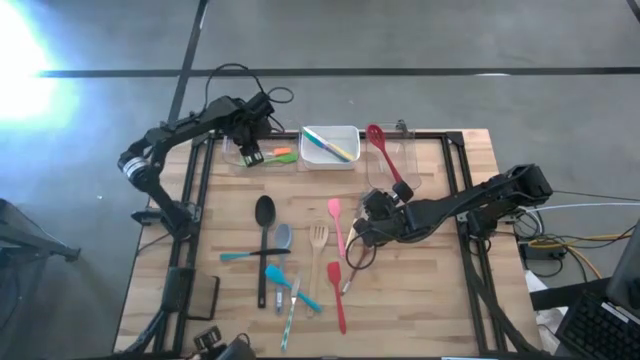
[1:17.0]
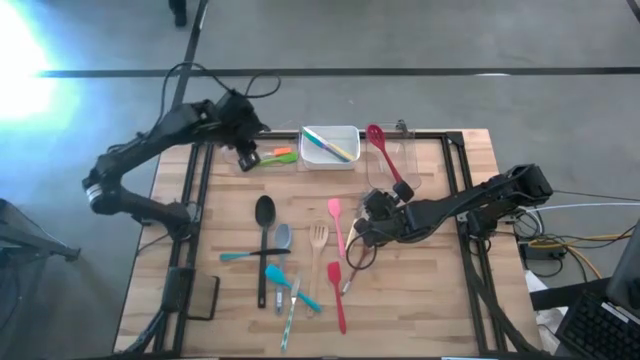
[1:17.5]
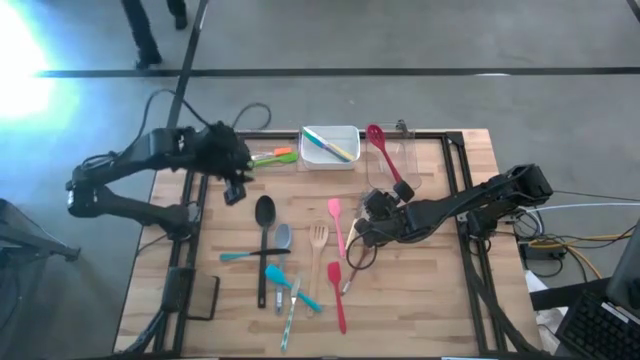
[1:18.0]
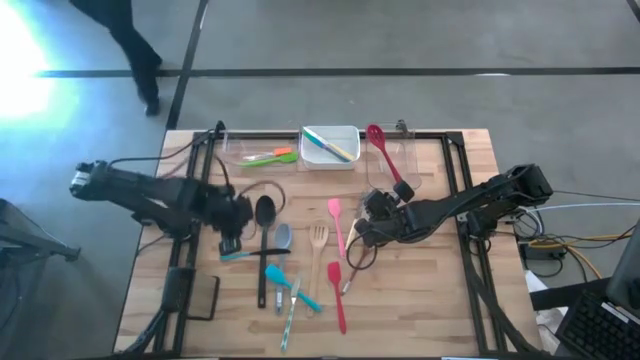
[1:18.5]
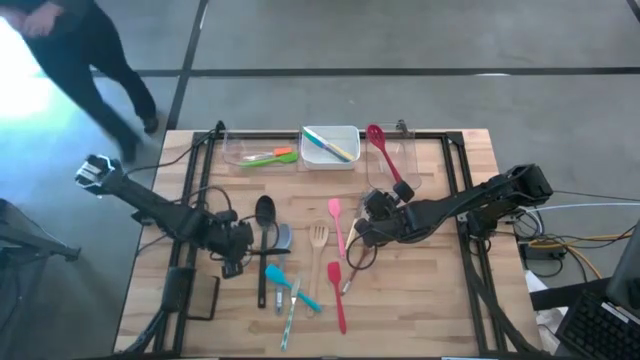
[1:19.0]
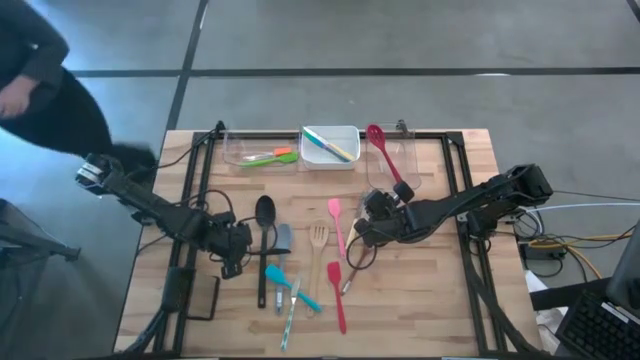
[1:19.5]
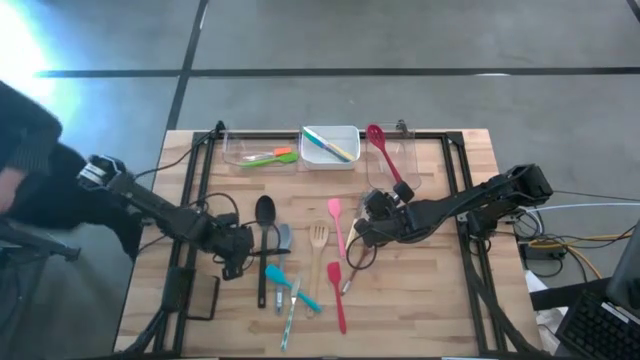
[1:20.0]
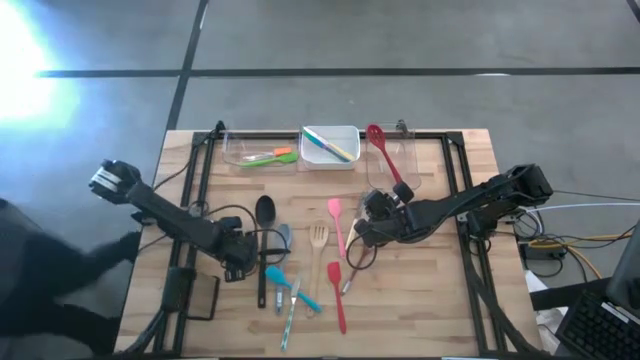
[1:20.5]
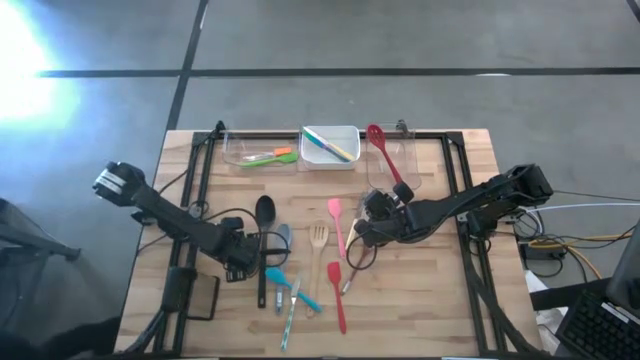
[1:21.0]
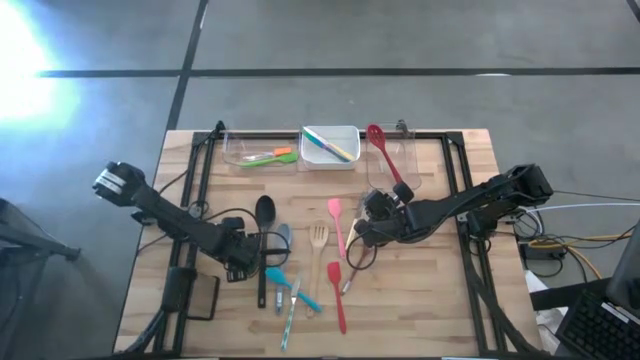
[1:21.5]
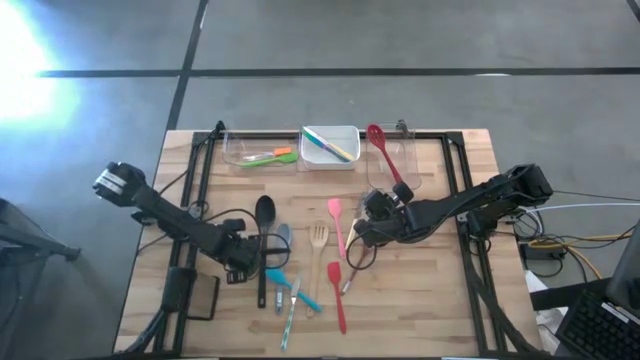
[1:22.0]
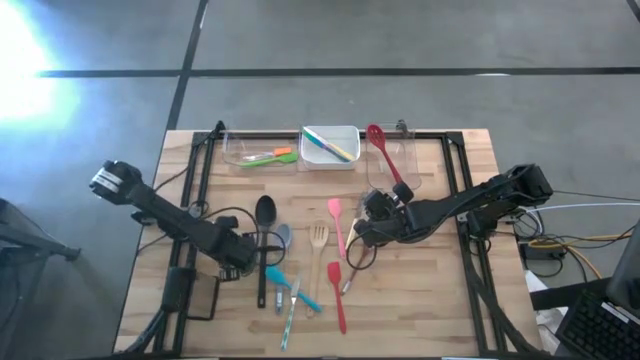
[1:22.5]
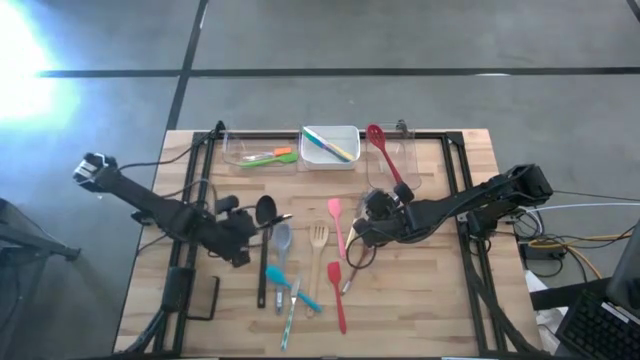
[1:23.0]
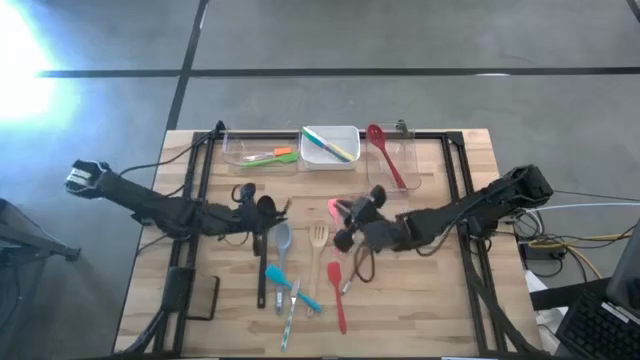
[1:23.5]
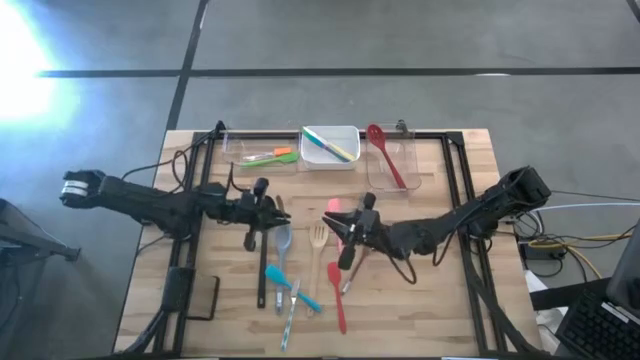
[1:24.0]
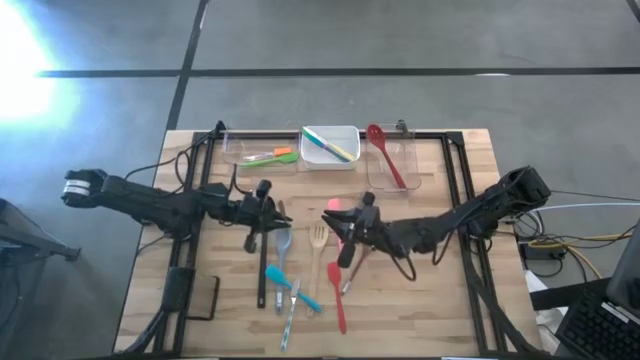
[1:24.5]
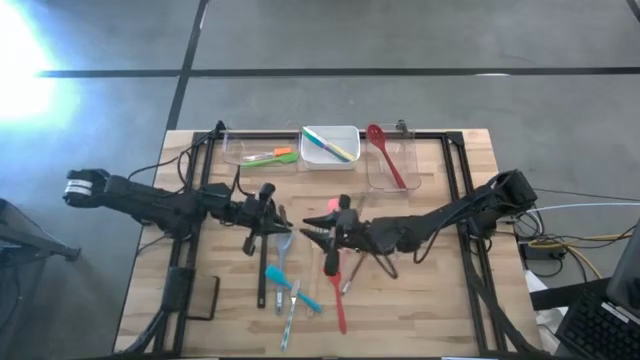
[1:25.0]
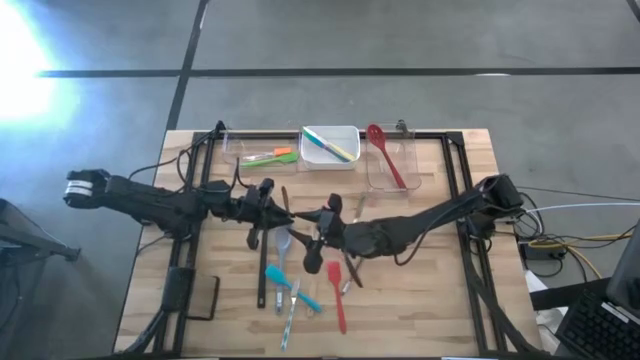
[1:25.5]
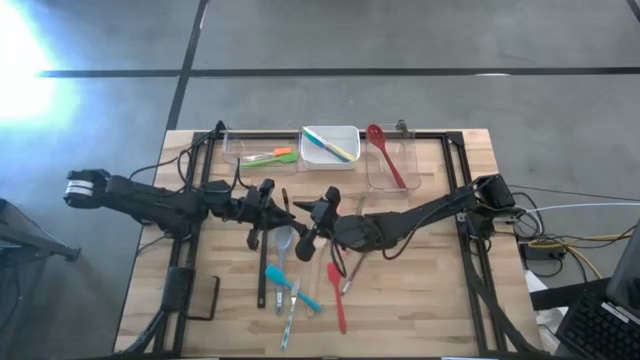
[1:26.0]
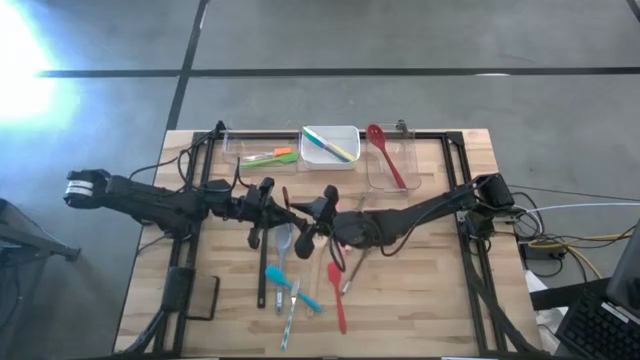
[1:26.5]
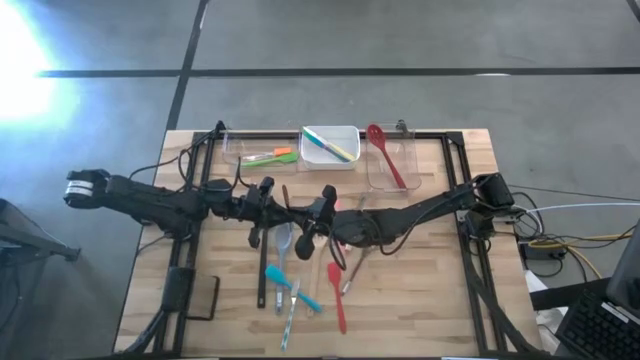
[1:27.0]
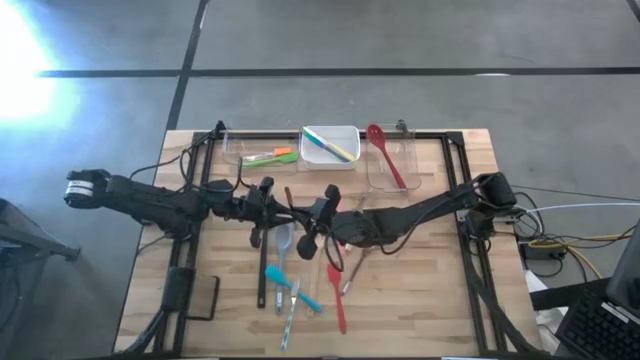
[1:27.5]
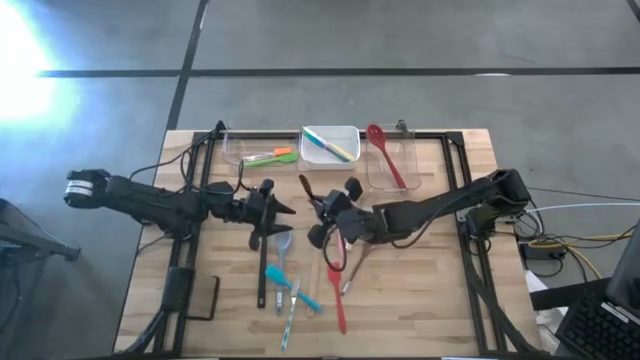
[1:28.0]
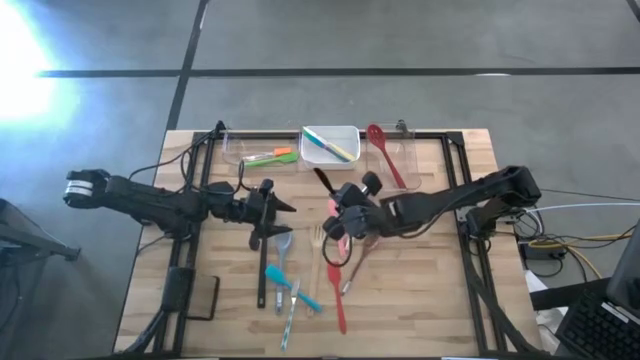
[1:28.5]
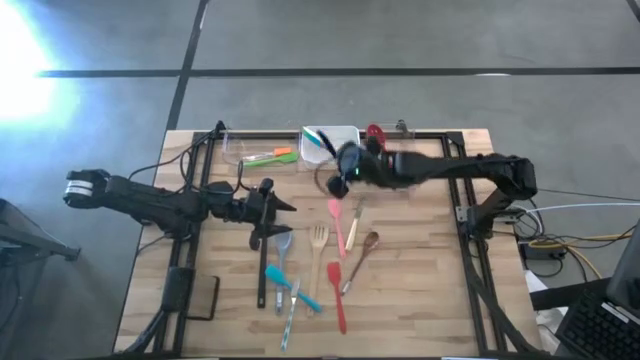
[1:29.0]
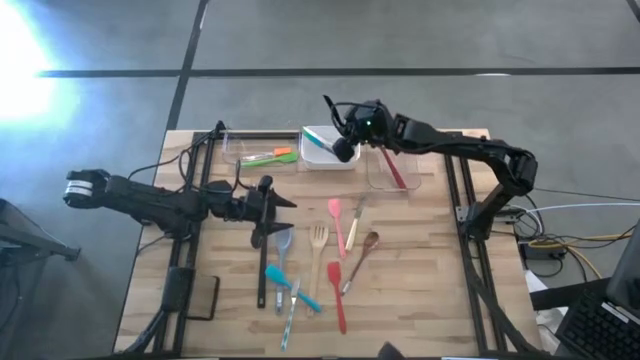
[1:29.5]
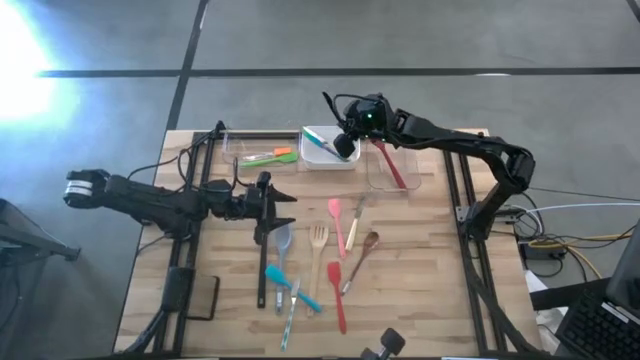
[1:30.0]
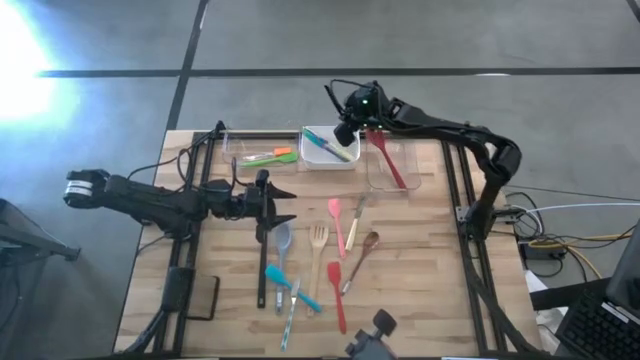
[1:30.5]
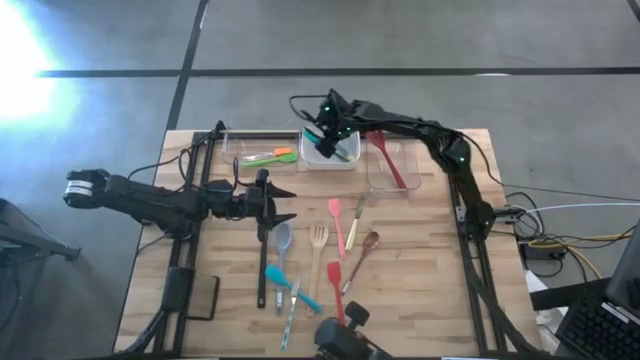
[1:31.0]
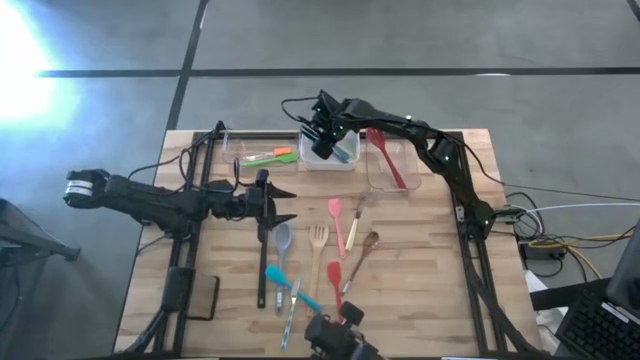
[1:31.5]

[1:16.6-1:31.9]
Task: Pick & Place Kitchen Items
Put the blue knife into the white bin

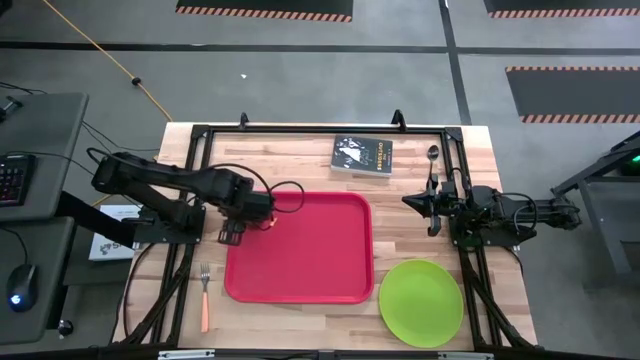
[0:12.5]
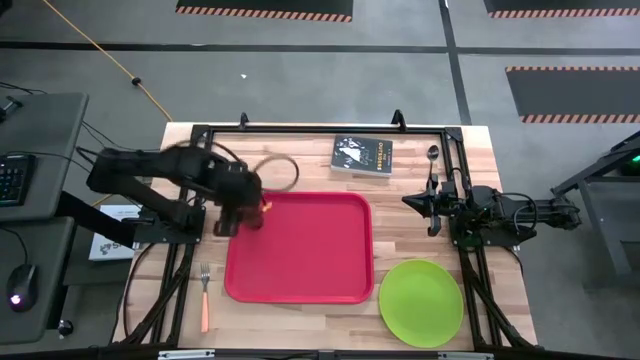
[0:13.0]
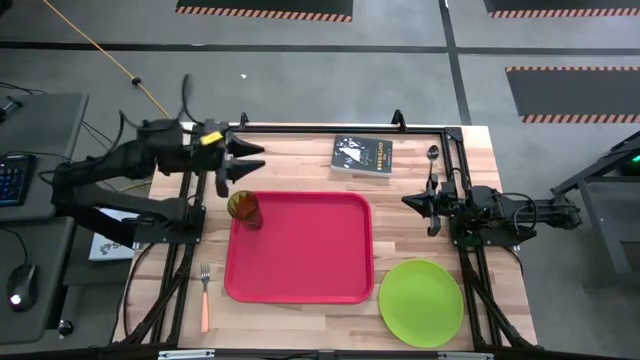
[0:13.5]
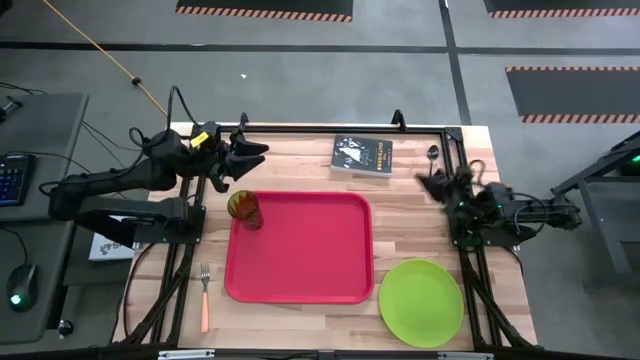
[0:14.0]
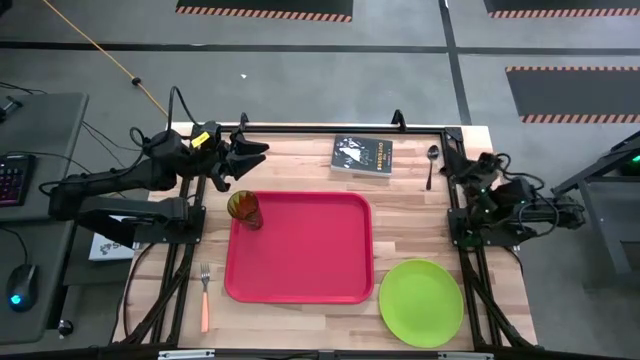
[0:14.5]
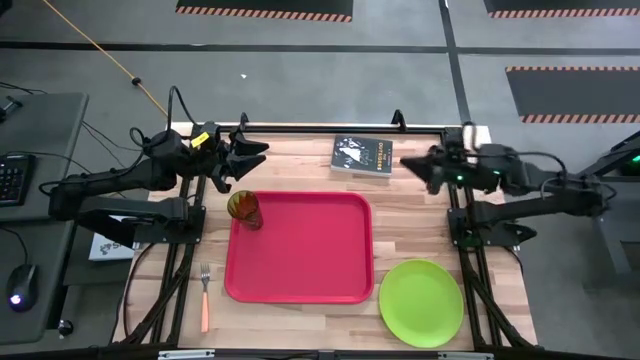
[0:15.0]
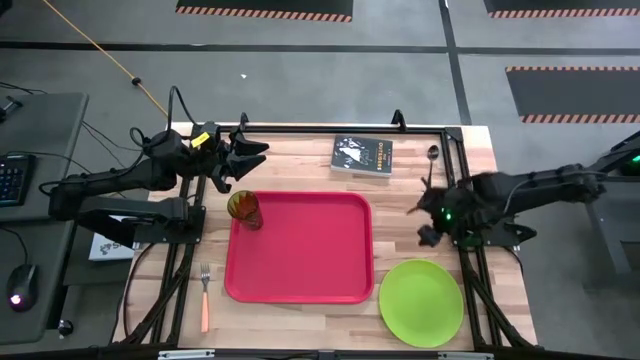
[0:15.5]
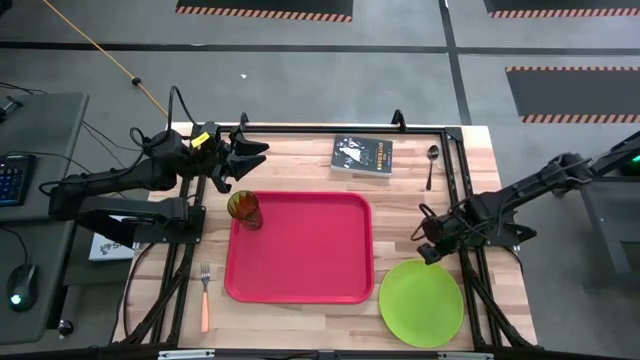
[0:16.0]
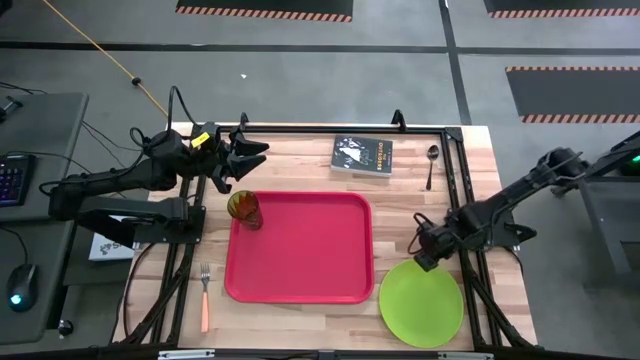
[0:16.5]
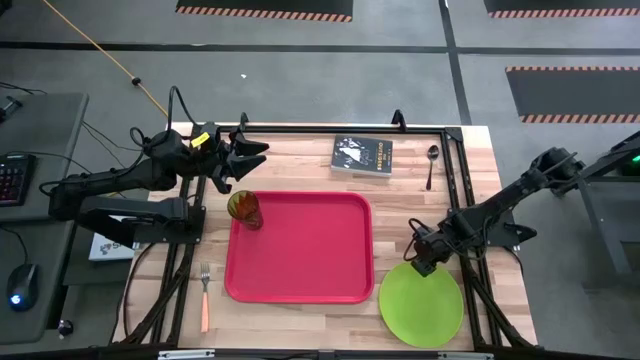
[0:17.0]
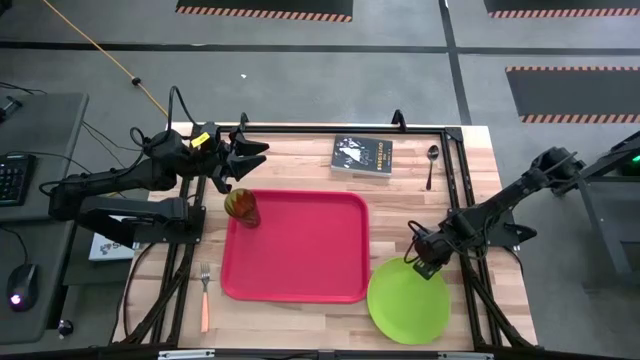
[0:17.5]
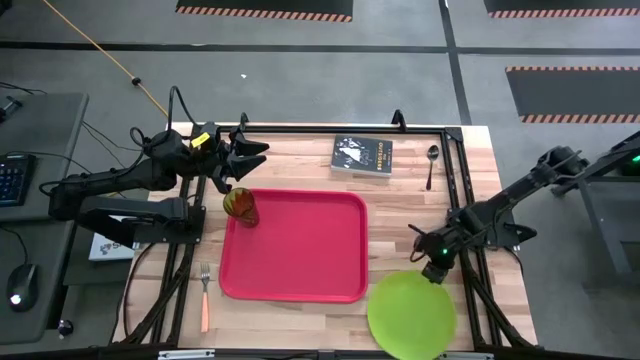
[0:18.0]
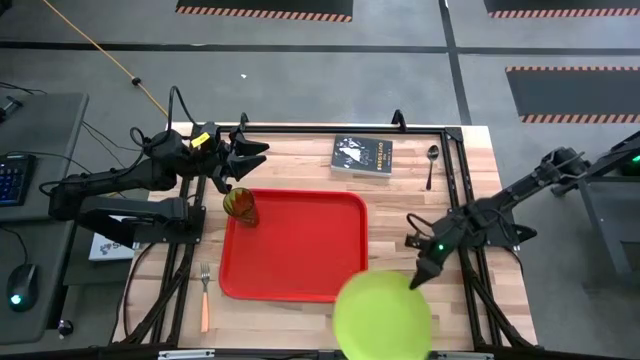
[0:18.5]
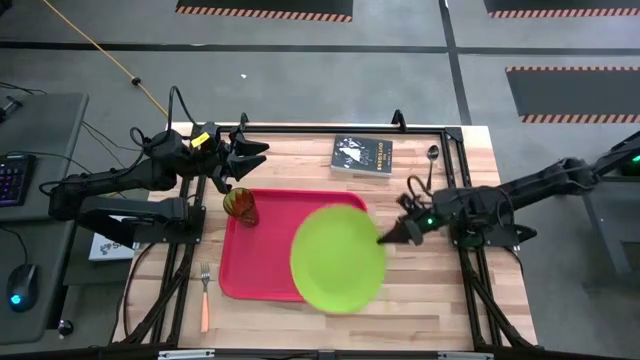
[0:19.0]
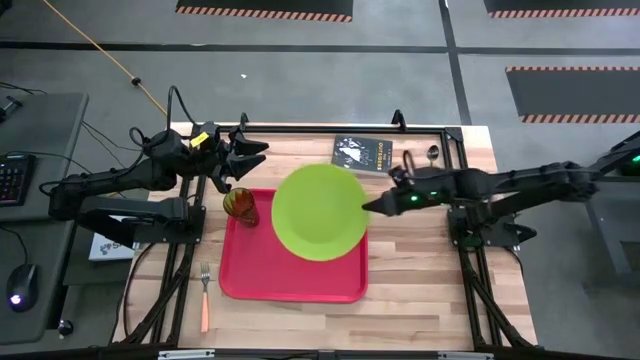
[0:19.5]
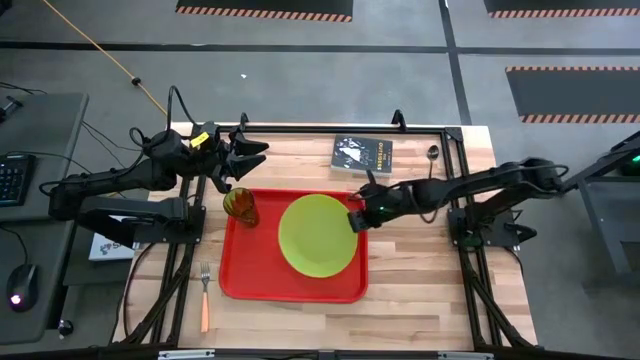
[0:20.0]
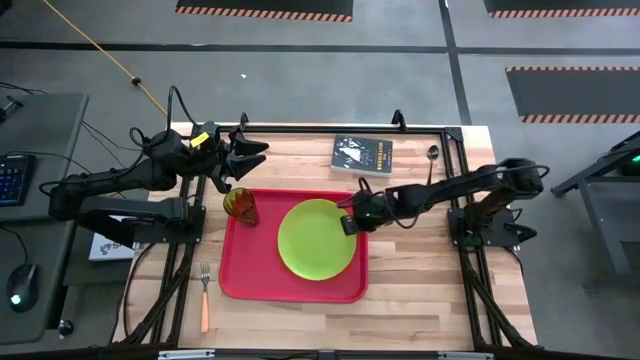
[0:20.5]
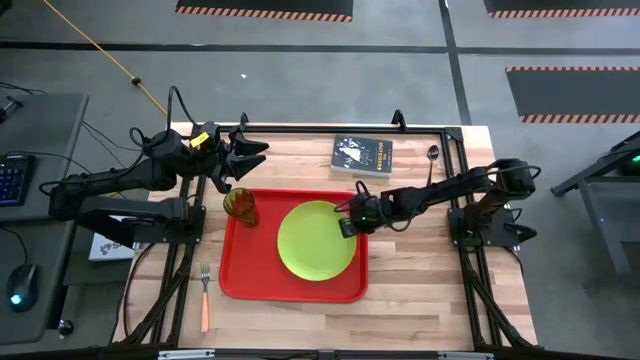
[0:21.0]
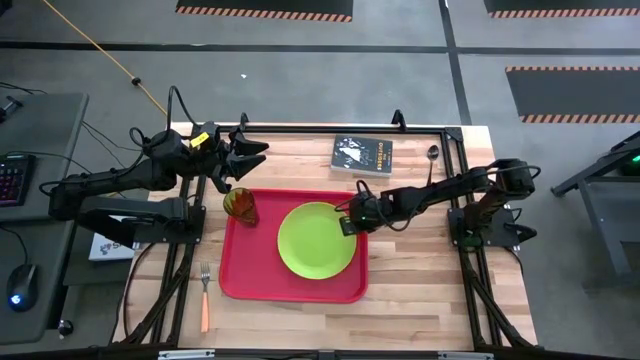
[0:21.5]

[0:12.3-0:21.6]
Task: Pick and place plate/cup/fork/spoon on tray
Put the green plate on the red tray to the right of the green cup
